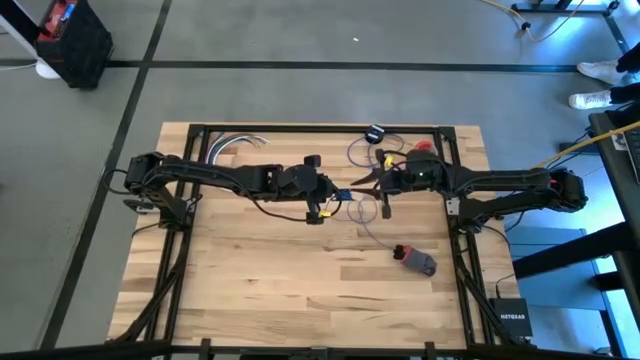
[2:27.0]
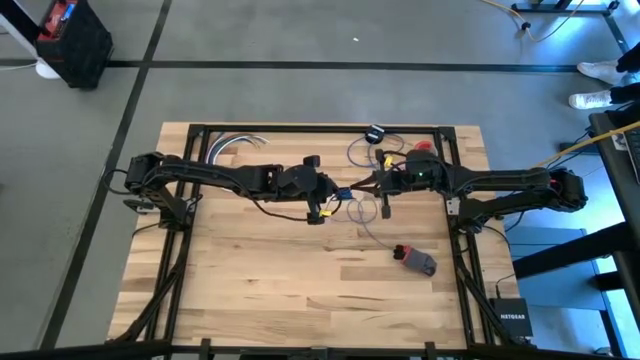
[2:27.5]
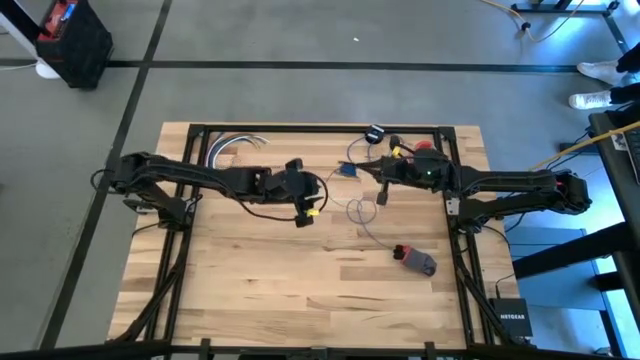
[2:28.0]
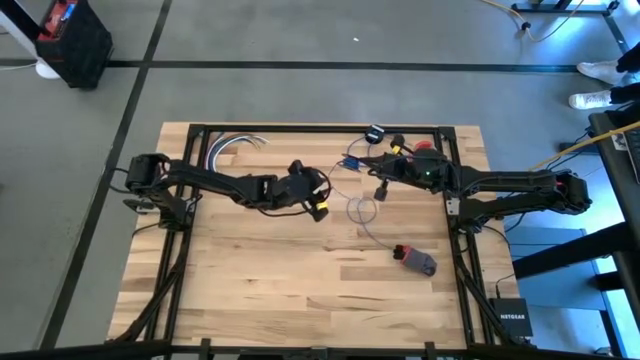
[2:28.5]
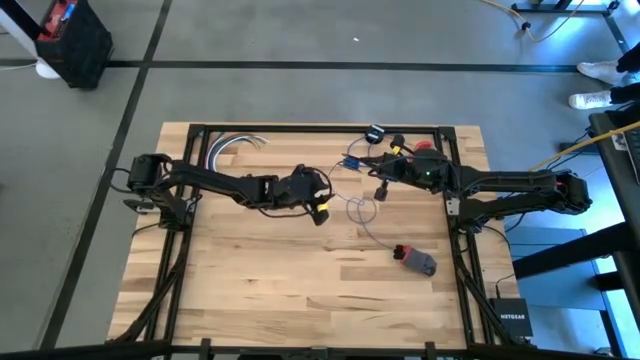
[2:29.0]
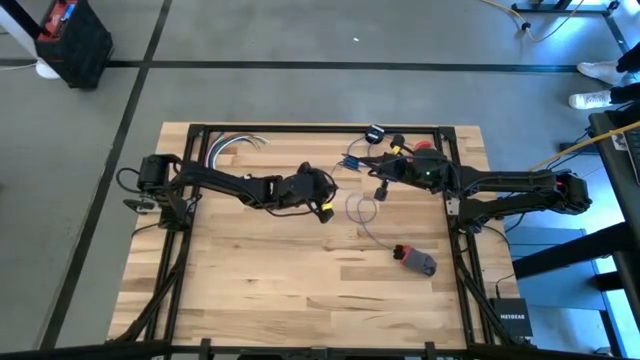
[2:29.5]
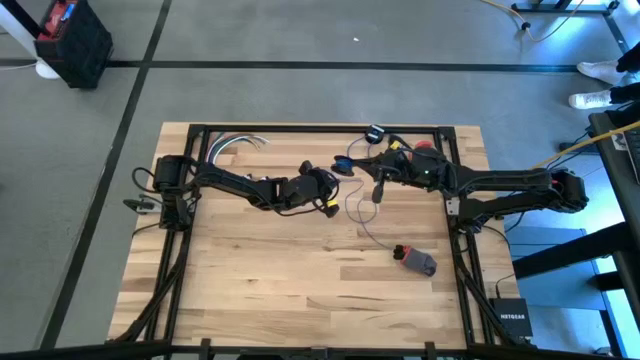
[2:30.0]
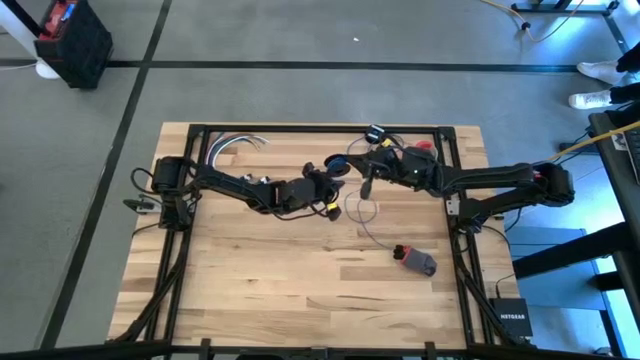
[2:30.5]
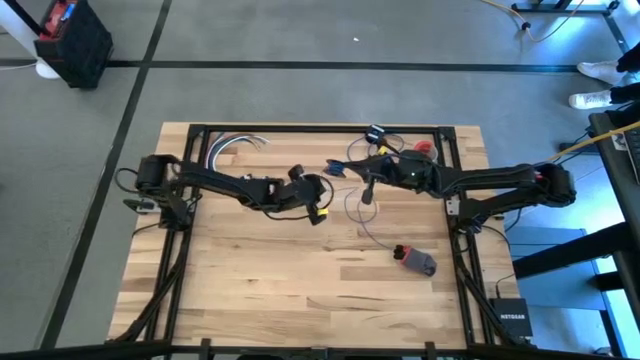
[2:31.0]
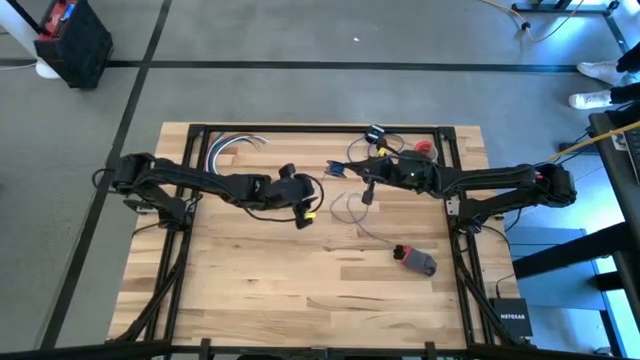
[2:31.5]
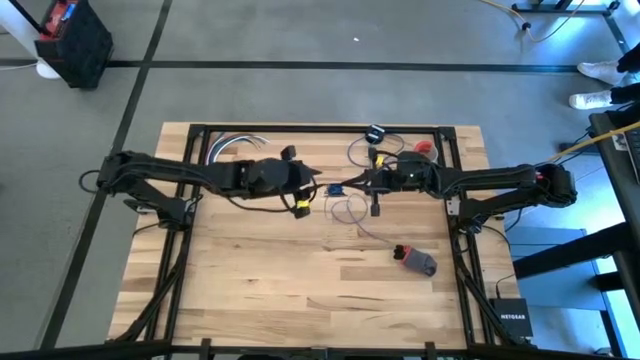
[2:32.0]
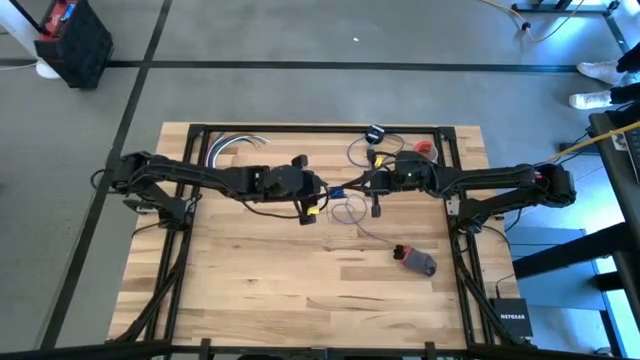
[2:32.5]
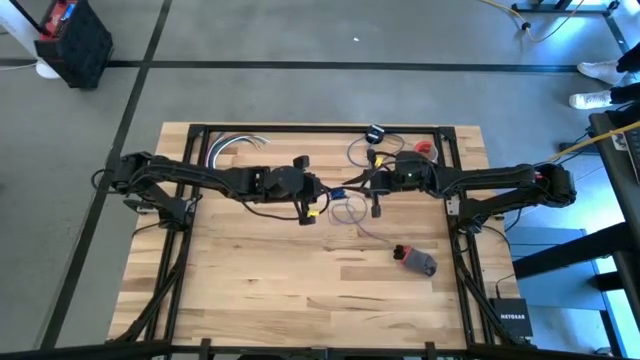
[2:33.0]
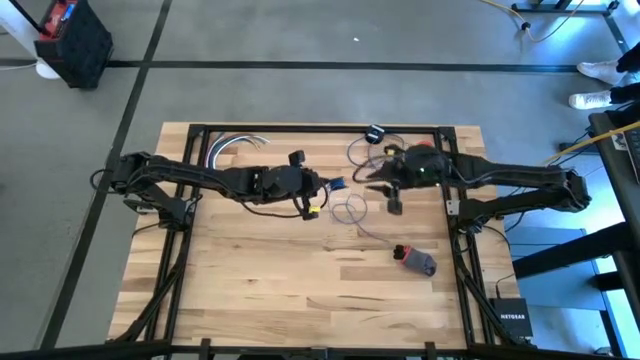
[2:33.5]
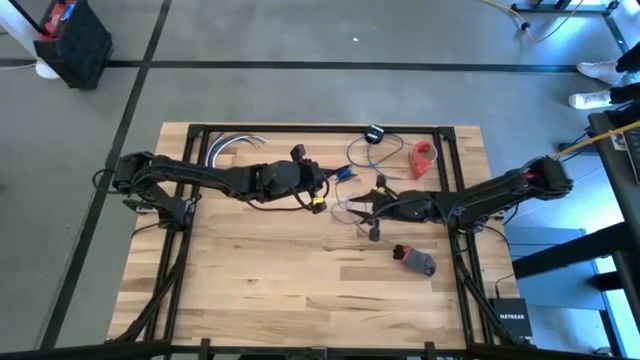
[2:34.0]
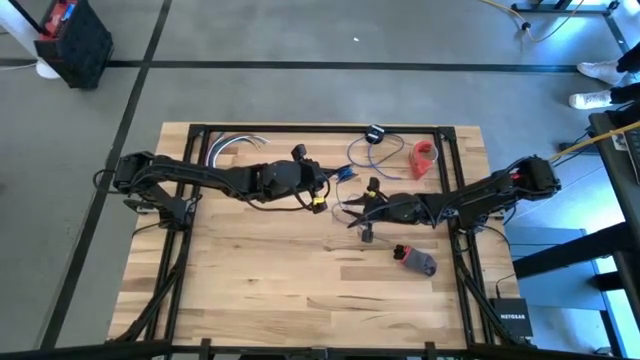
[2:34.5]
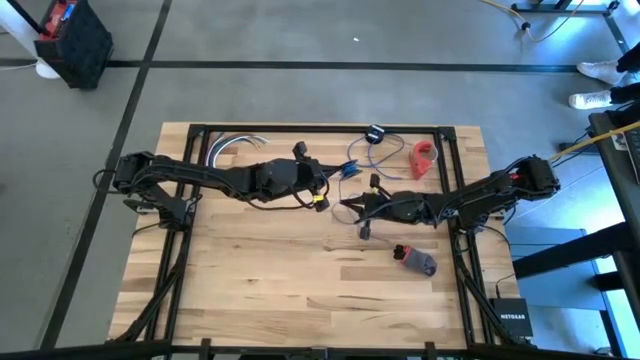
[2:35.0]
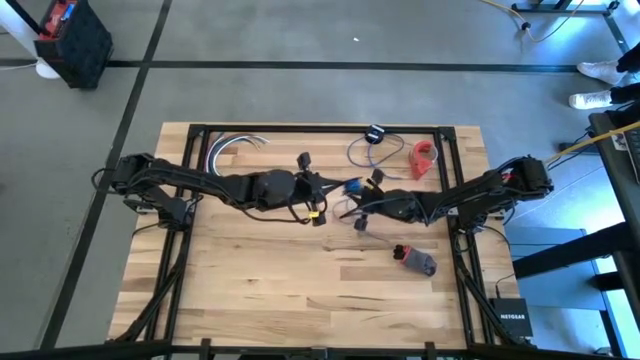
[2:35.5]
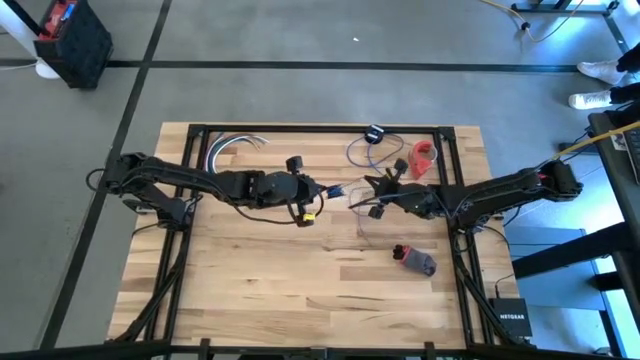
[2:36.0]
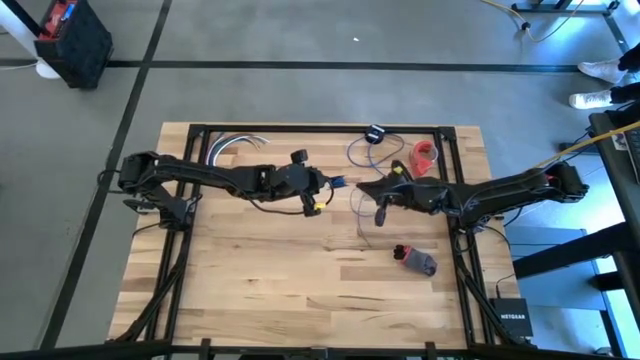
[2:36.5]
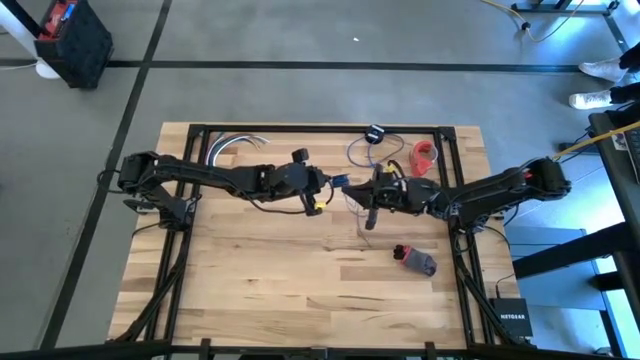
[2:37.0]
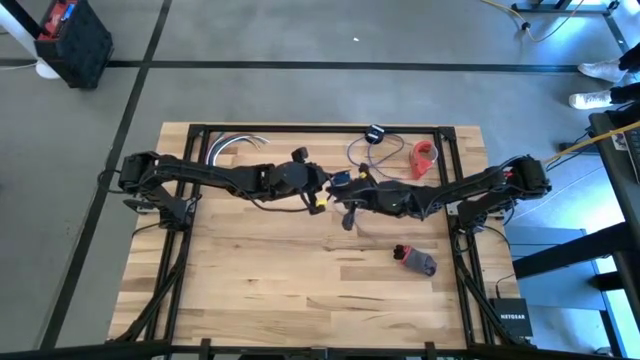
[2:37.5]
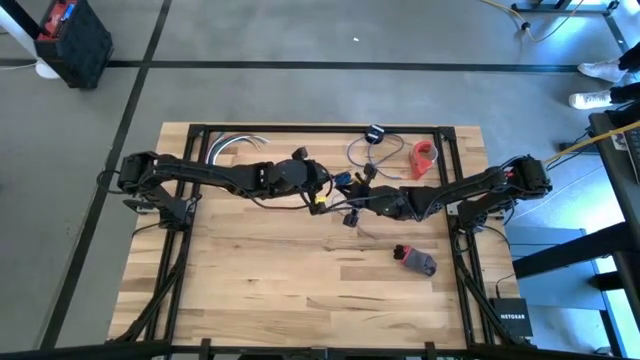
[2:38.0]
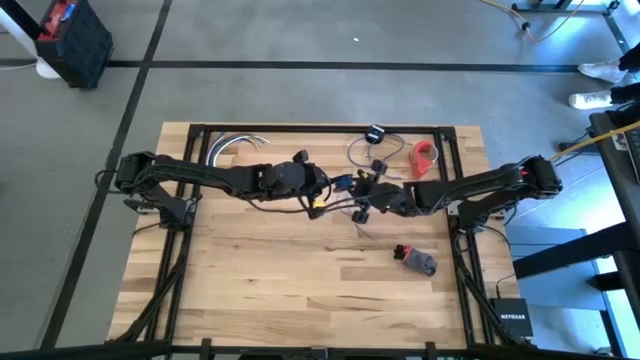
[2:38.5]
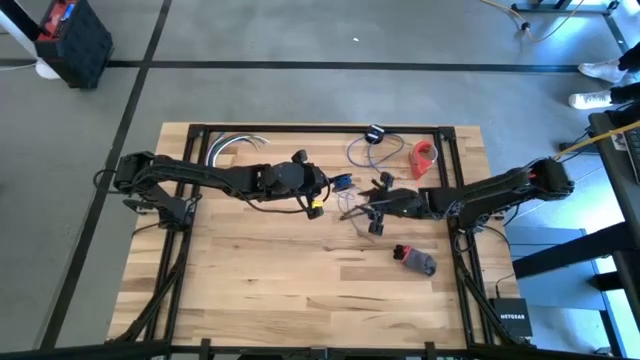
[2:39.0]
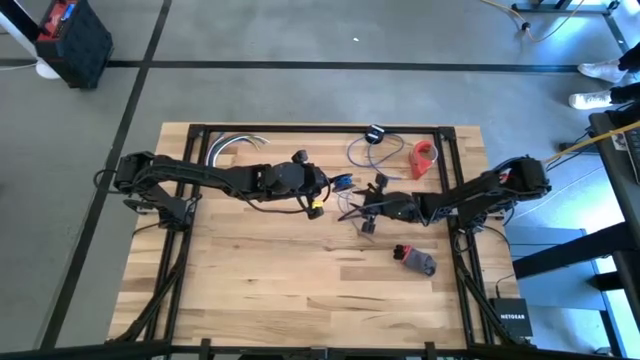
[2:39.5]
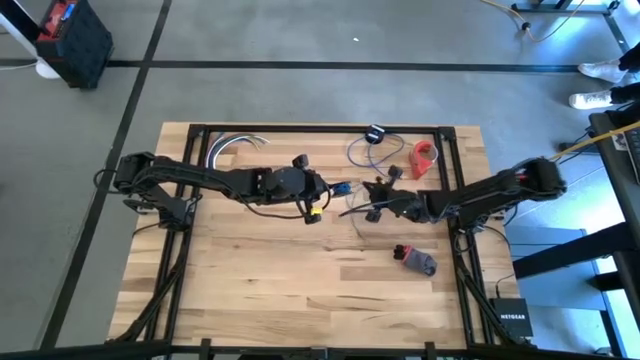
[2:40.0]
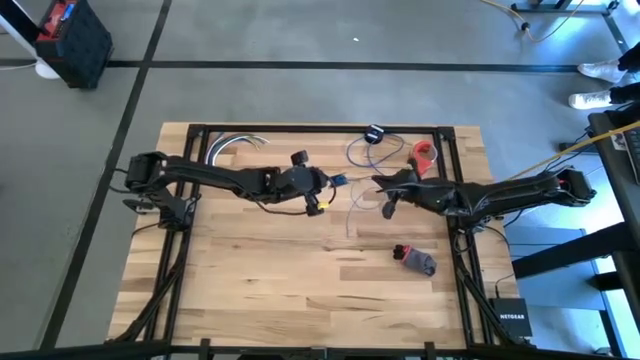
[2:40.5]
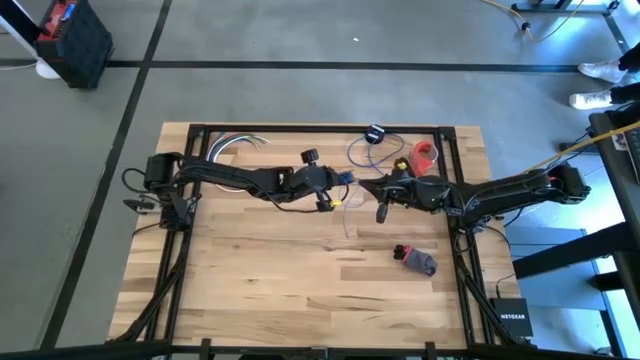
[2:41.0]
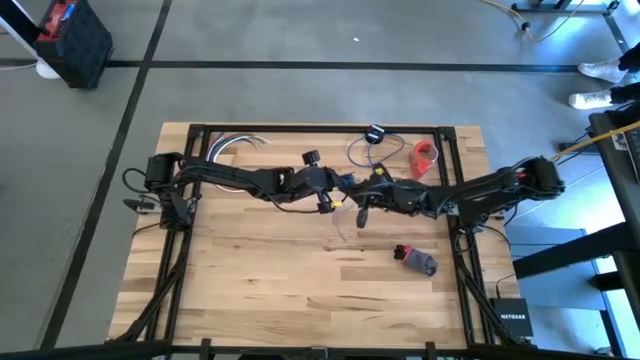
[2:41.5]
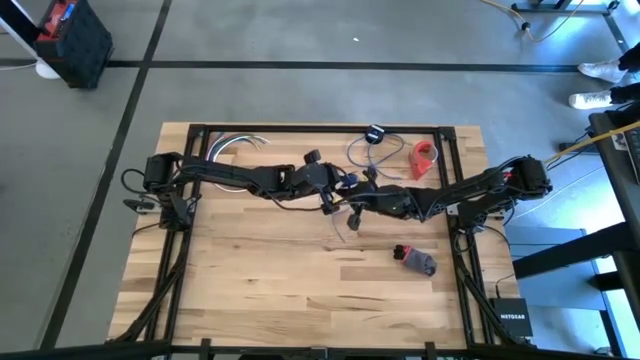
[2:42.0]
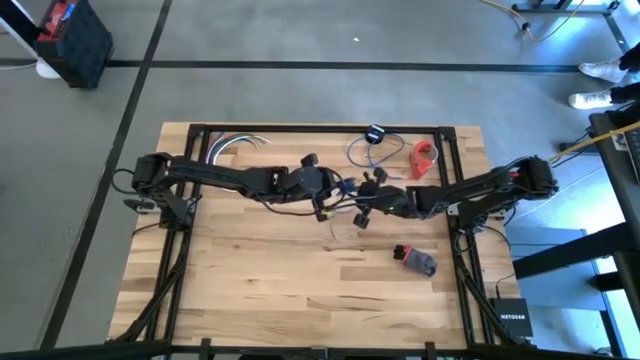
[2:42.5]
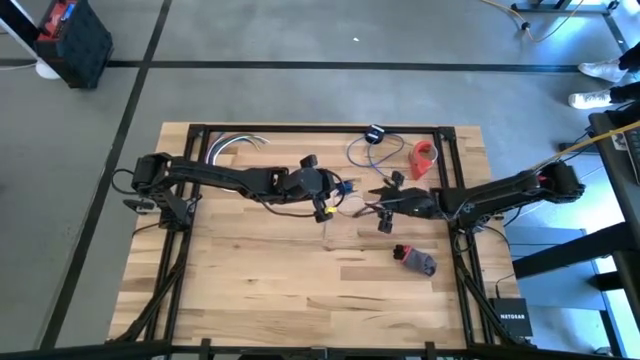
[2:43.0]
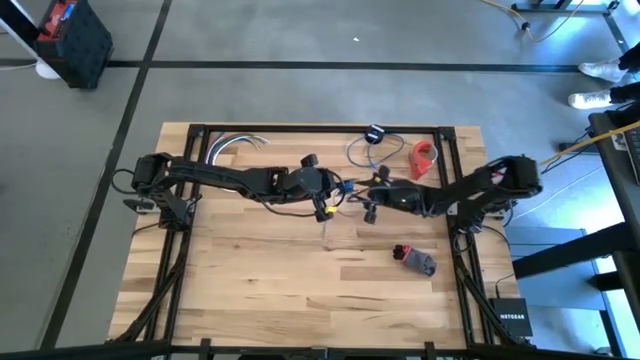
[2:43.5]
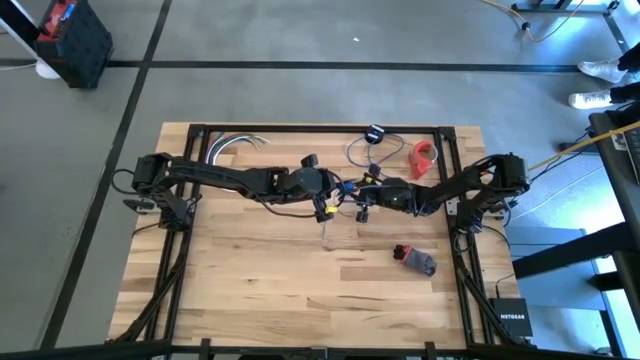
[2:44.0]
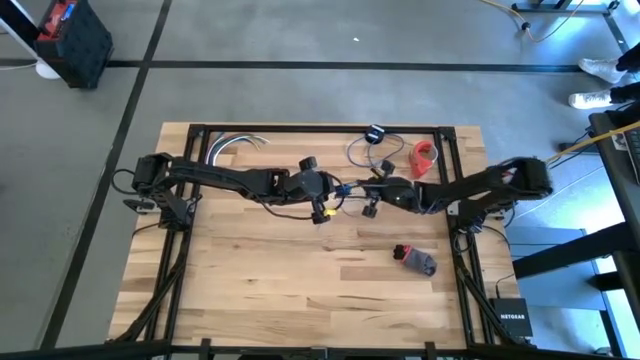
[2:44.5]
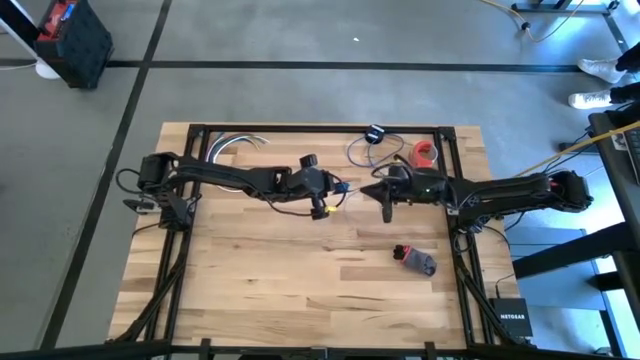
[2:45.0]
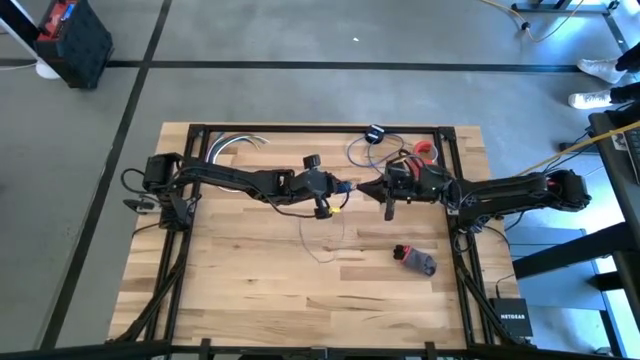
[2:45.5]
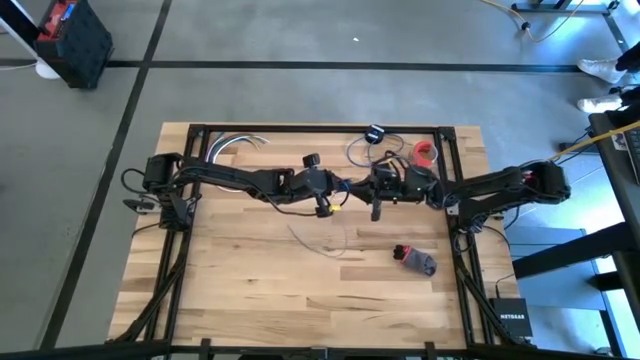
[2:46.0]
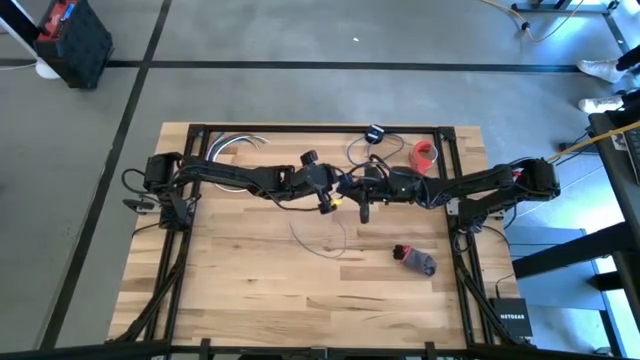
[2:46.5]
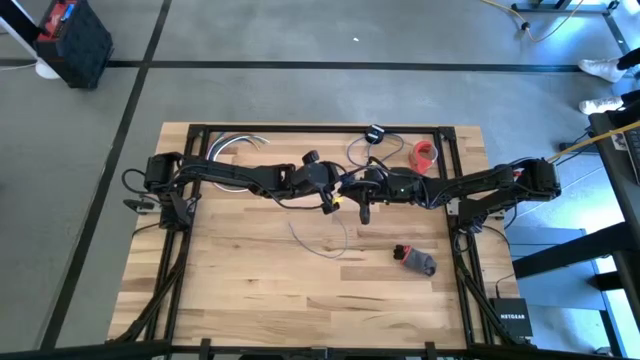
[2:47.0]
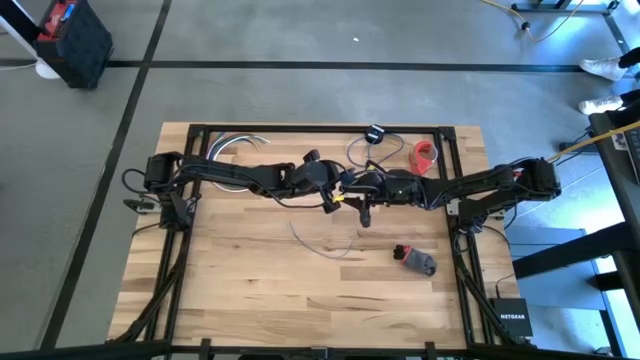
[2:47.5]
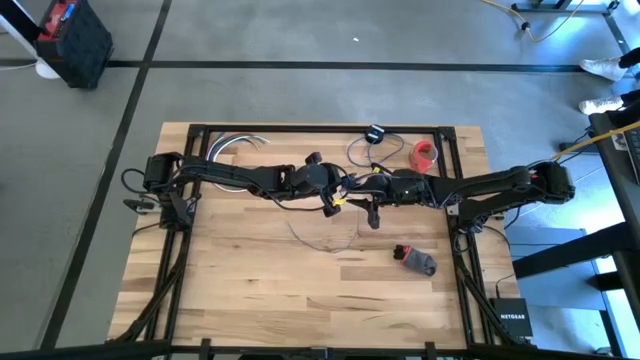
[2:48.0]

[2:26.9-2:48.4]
Task: Coil cords
Coil the blue wire onto the spool
